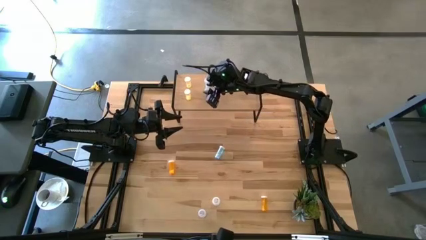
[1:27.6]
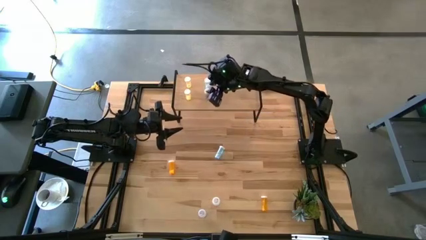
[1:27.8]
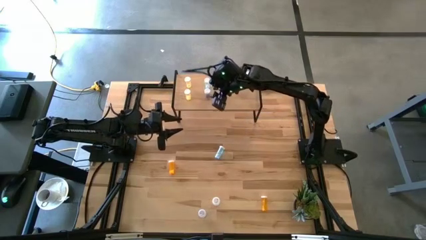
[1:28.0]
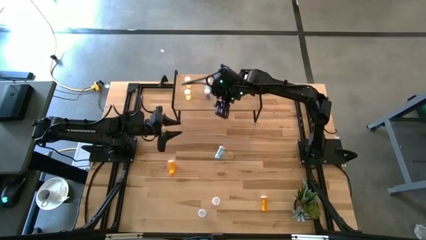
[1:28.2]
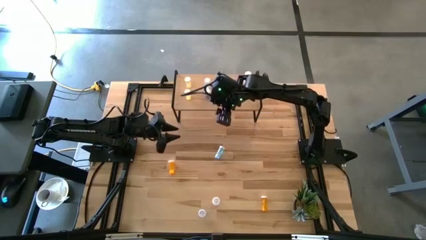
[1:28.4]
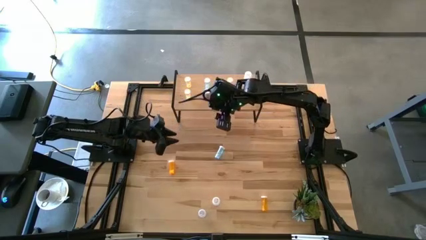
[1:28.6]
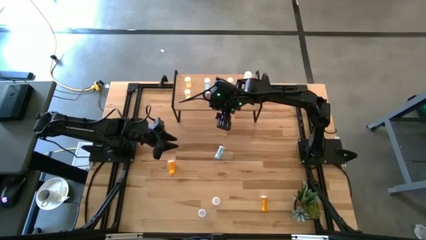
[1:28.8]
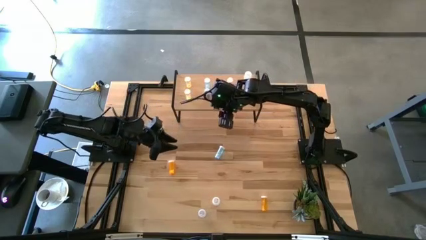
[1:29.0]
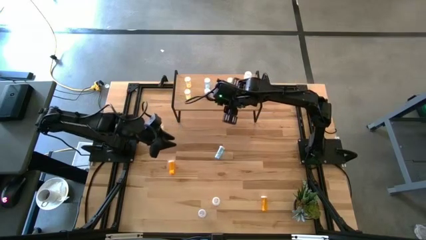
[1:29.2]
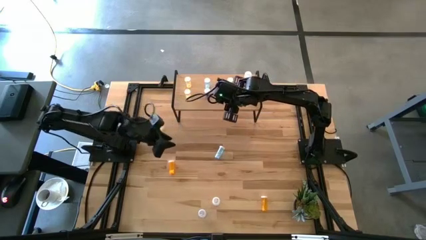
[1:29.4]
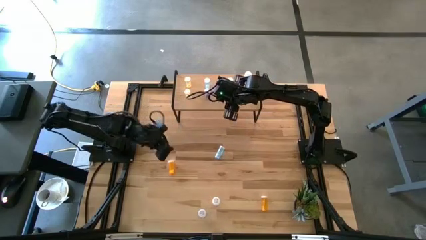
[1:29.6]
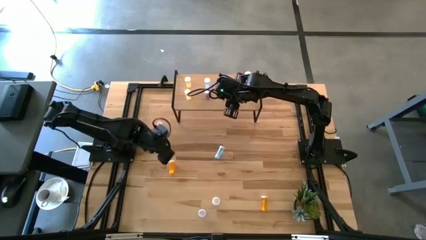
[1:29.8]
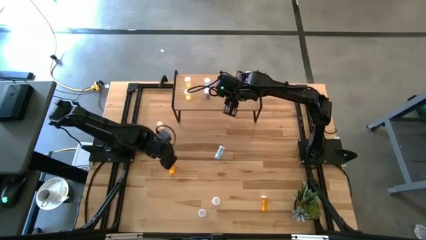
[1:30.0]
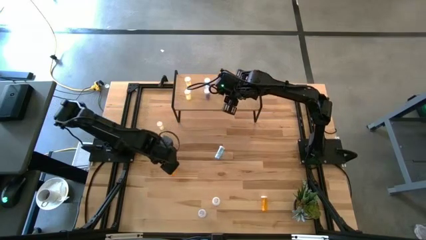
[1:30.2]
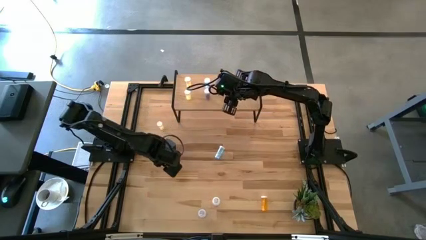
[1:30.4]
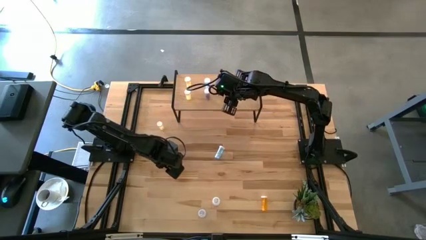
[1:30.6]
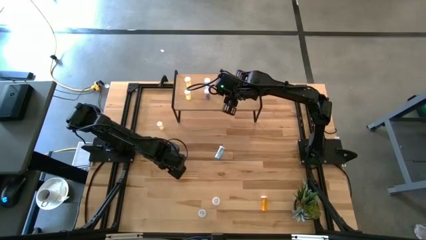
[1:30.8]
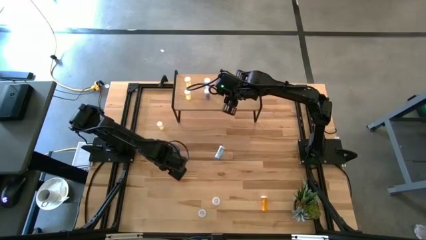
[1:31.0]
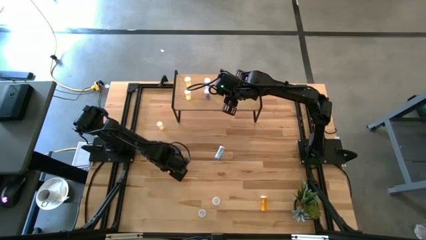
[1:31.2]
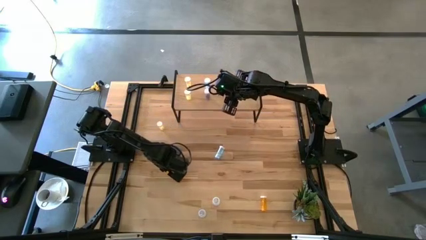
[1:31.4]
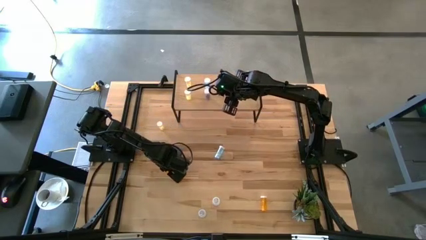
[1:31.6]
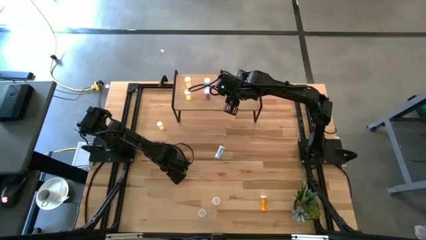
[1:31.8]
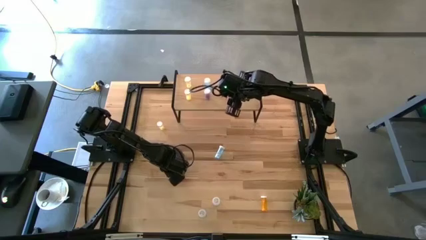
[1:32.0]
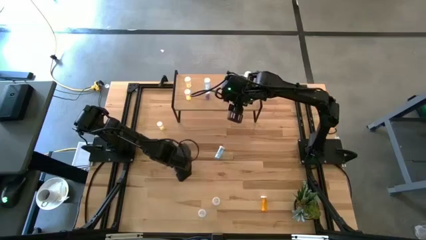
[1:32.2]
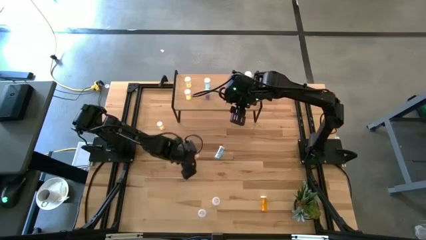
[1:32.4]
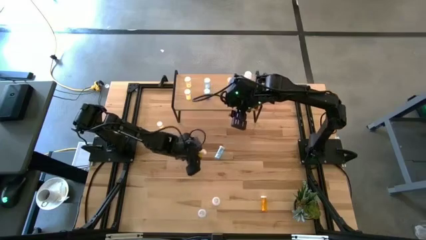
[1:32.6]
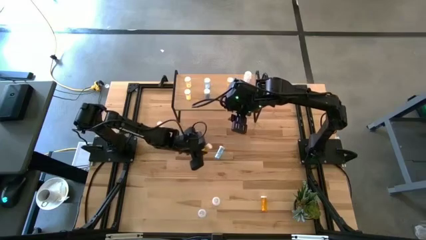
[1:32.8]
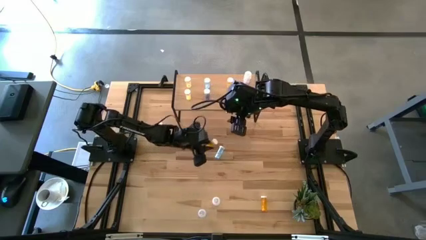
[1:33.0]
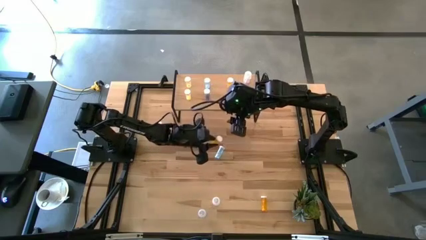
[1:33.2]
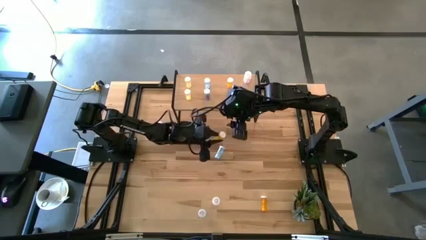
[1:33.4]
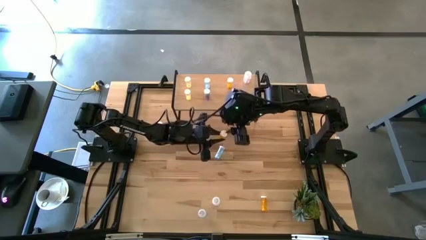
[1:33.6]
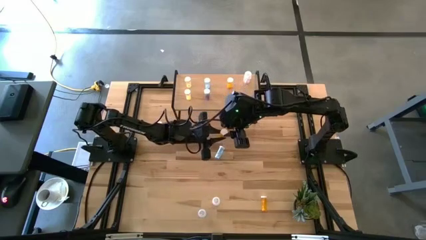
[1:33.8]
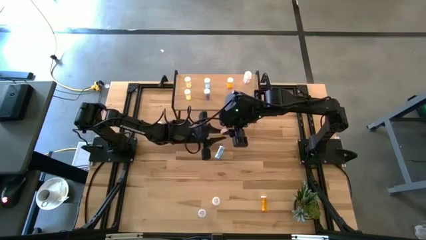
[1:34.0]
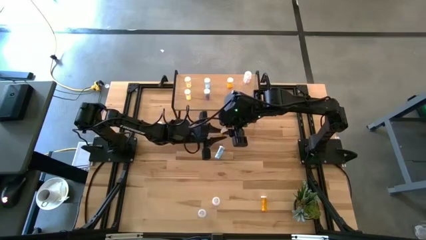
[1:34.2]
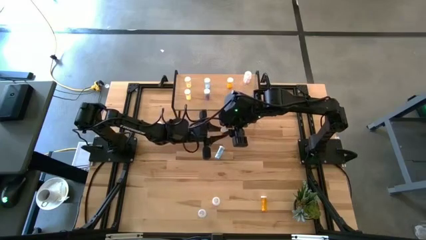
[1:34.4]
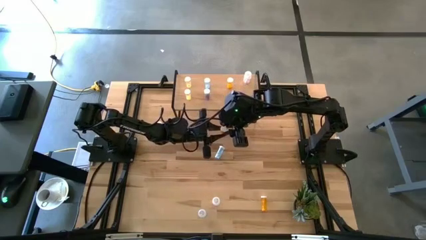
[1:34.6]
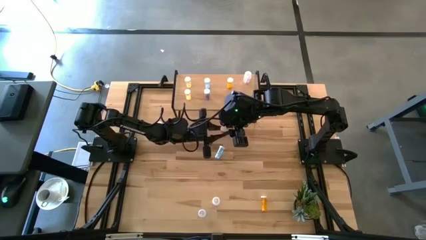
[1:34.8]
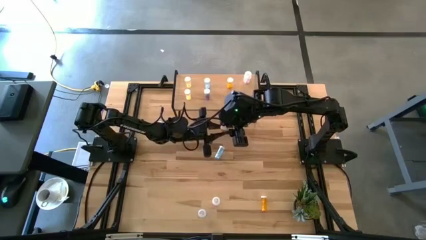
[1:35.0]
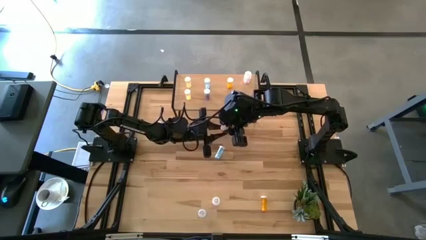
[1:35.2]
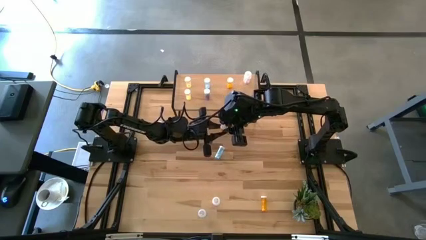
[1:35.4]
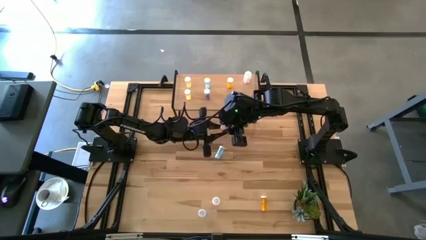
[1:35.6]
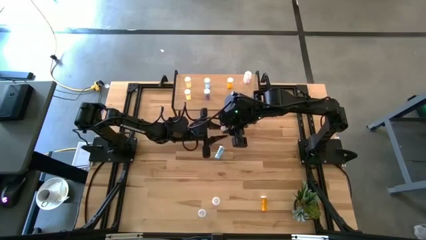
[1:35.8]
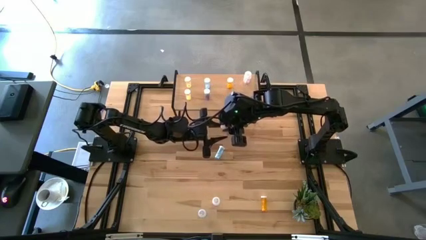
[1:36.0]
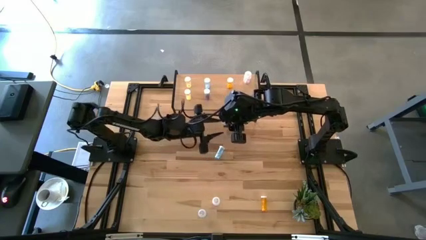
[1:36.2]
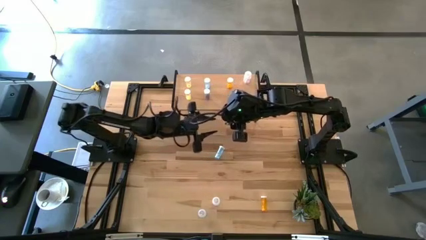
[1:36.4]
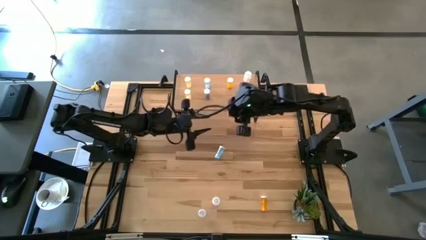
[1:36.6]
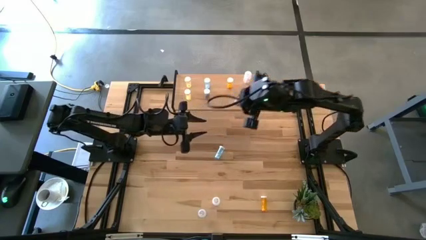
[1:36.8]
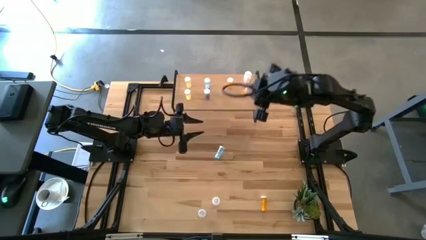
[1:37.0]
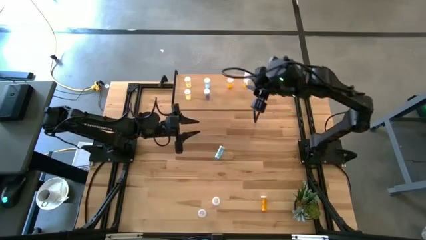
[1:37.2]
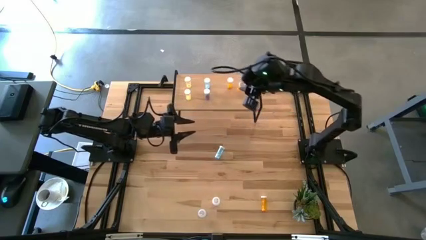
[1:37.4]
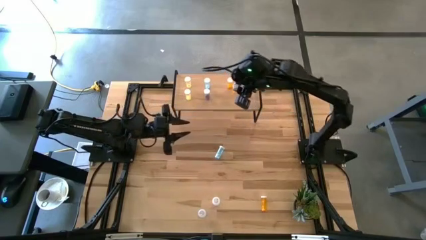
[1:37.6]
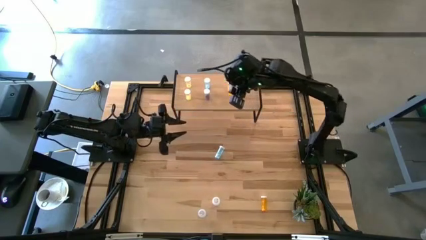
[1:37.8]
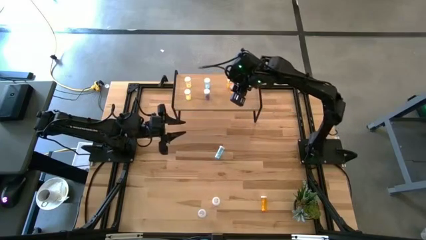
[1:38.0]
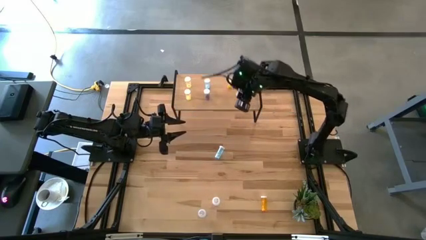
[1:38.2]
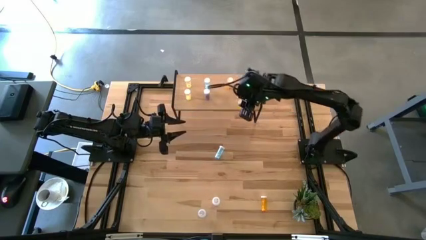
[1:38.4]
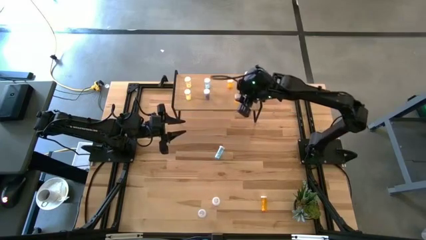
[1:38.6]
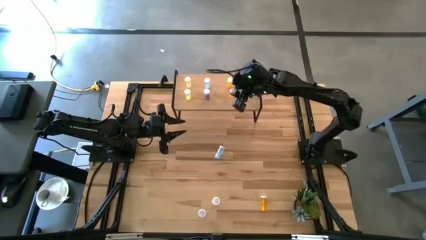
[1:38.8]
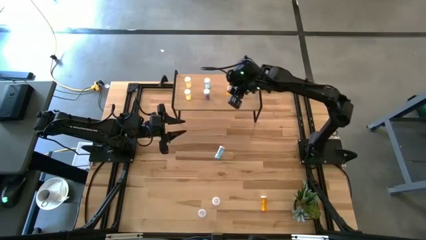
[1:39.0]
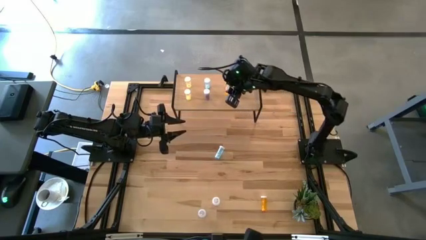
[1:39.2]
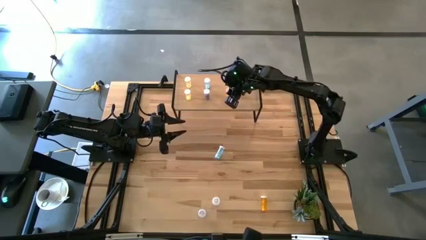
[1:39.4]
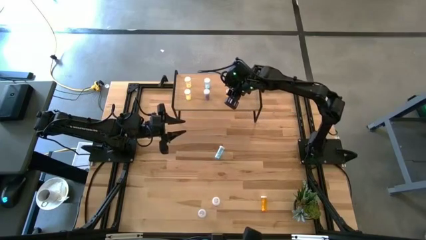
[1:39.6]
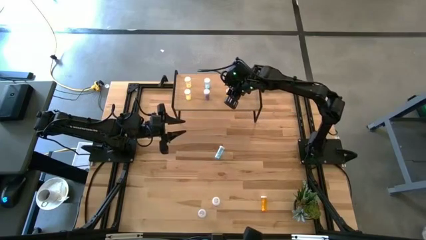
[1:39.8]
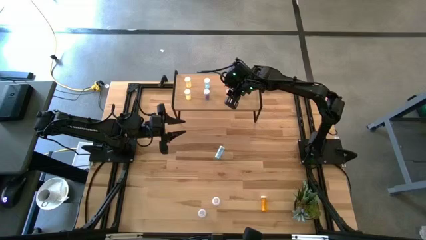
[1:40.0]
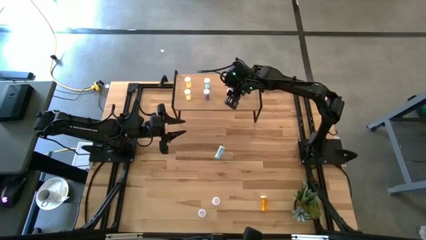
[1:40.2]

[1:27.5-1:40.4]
Task: Pick and place medicine bottles onto shelf by color
Put the top orange pill bottle on the shelf aligned with the other orange pill bottle

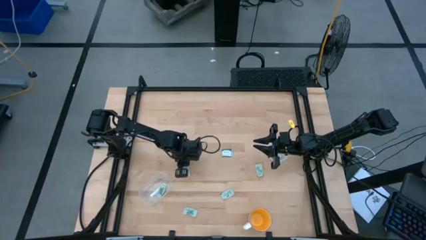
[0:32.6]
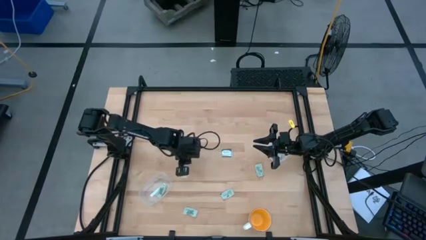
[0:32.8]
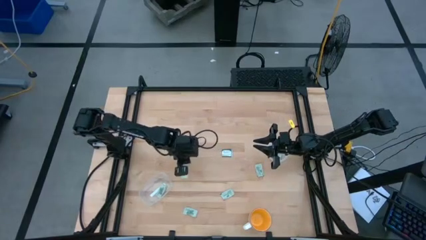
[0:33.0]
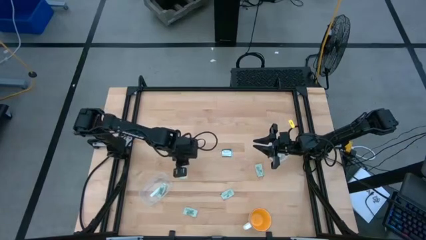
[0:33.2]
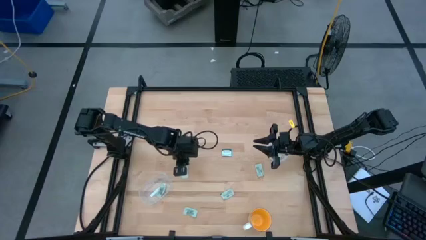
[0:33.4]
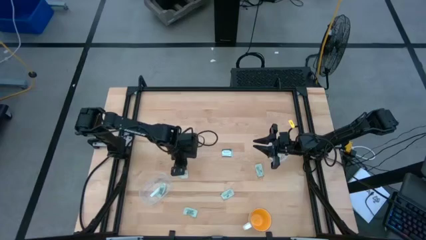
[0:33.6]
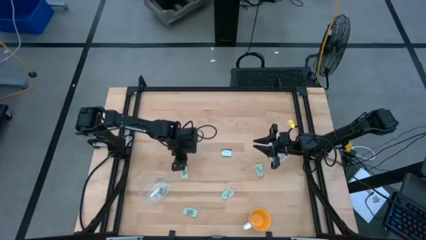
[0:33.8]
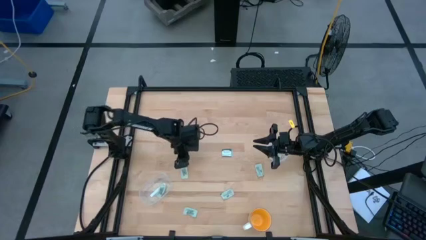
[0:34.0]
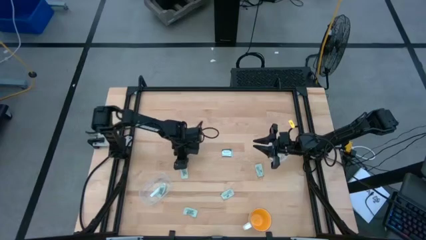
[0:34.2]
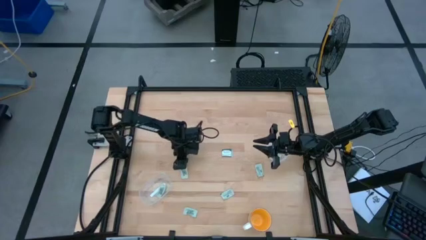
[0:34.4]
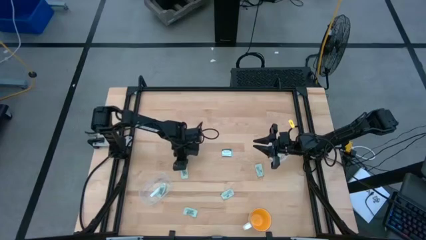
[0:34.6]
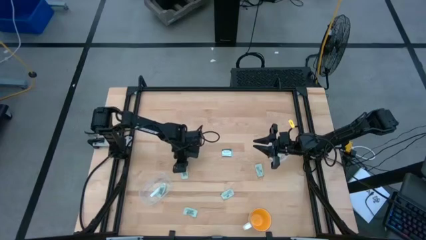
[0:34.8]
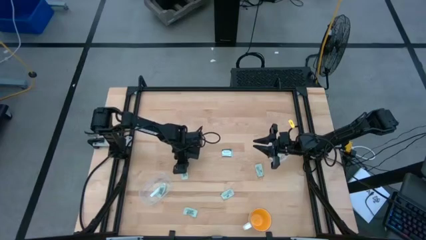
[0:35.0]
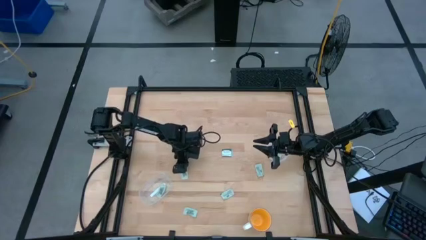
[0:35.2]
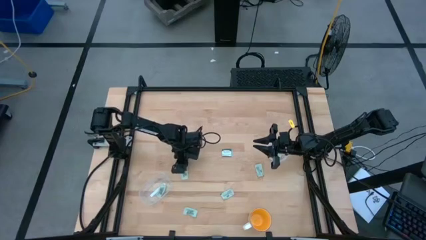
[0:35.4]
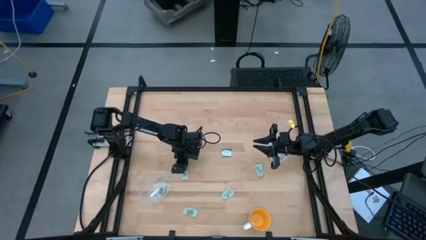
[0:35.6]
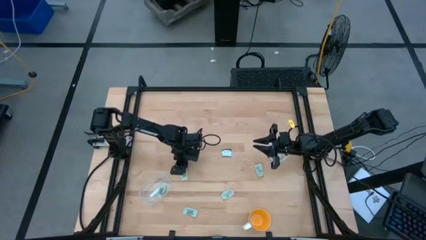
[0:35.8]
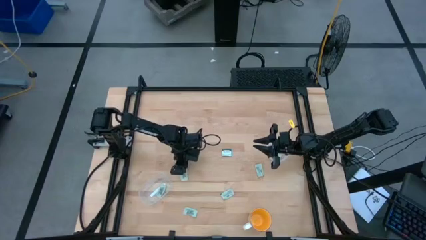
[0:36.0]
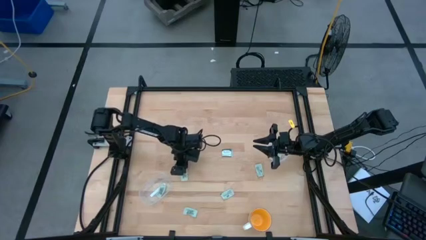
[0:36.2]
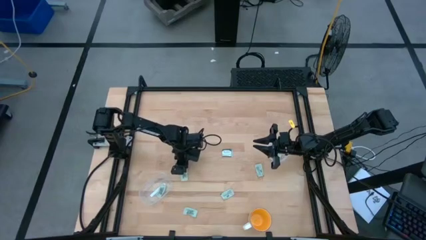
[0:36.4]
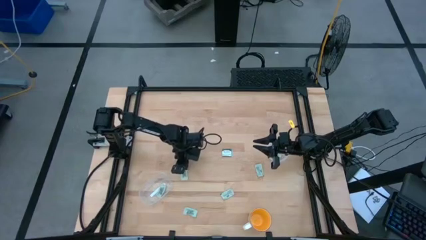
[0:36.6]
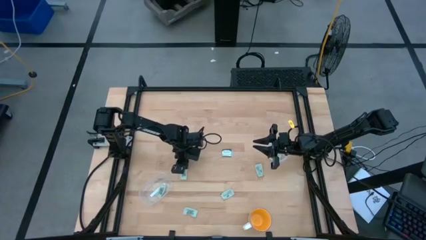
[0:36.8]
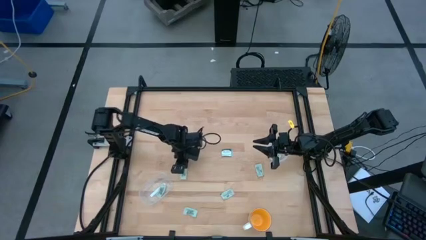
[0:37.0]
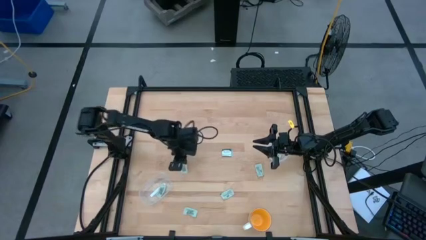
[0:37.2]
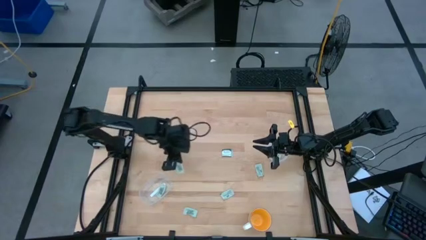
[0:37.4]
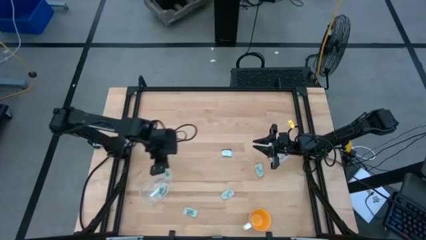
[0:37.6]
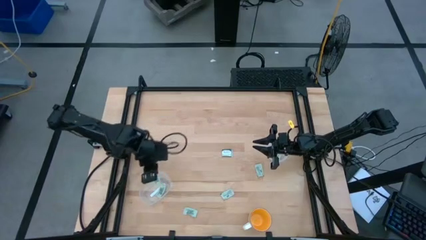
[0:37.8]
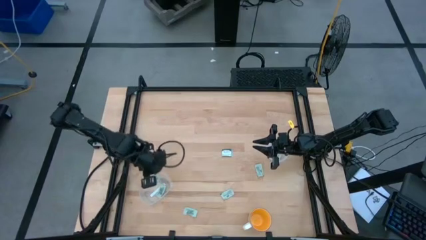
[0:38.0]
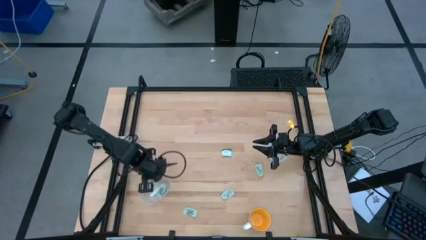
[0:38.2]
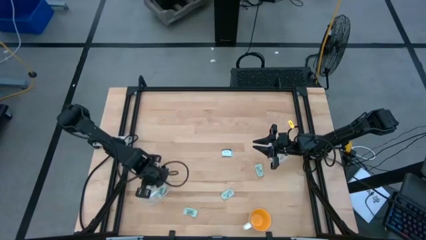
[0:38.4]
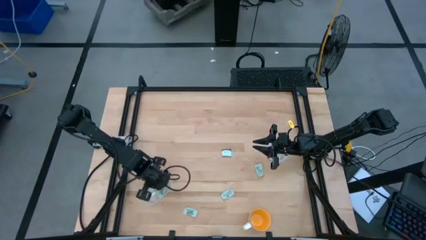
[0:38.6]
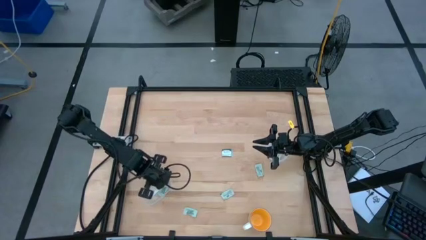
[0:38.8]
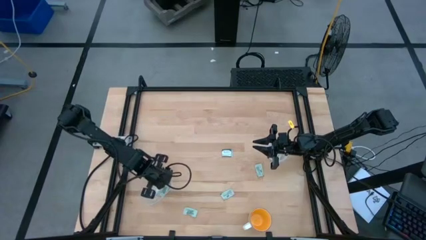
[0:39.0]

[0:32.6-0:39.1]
Task: Pick and place Stevia / Truvia into bins
Put the white stevia packet into the rectangle transparent container
